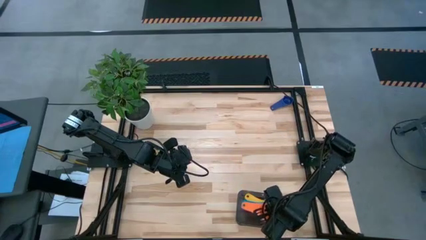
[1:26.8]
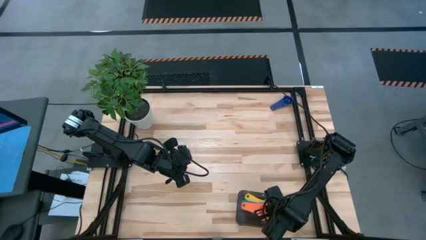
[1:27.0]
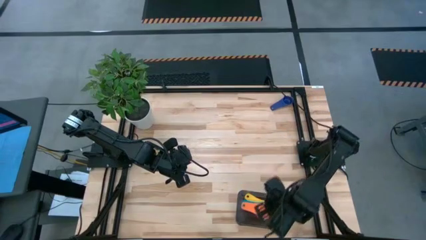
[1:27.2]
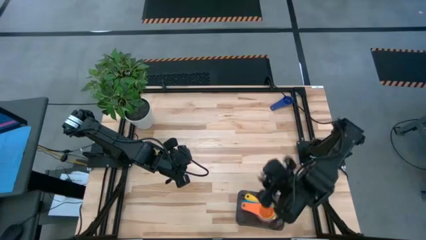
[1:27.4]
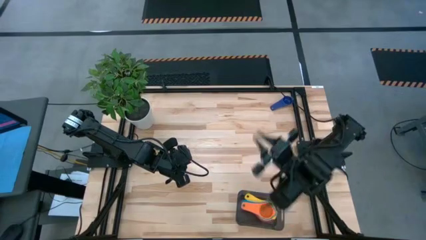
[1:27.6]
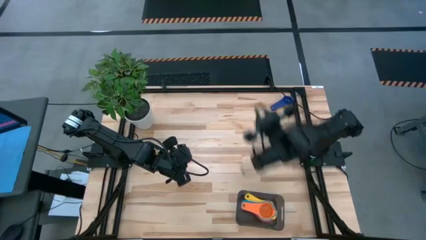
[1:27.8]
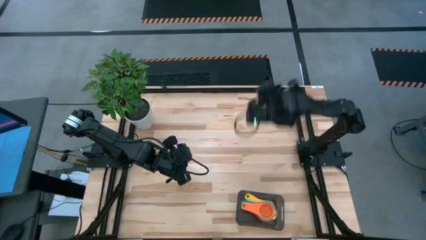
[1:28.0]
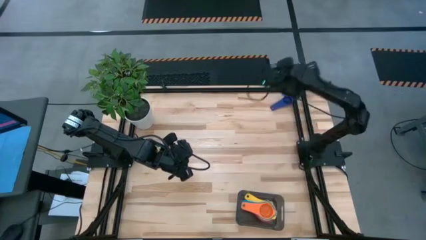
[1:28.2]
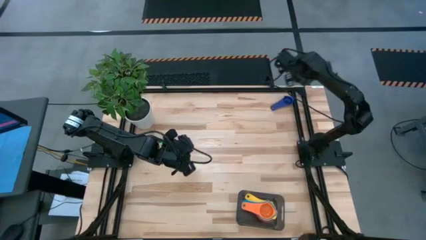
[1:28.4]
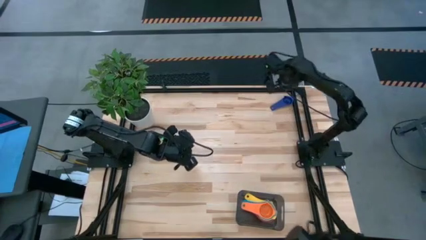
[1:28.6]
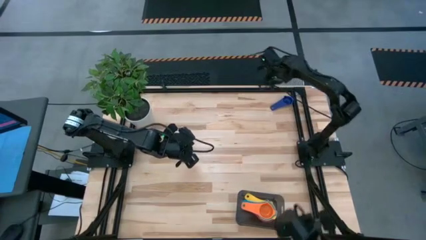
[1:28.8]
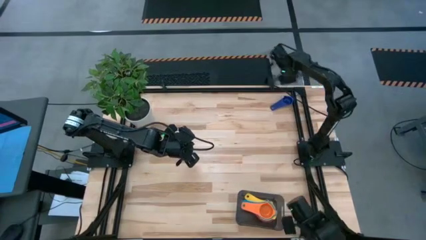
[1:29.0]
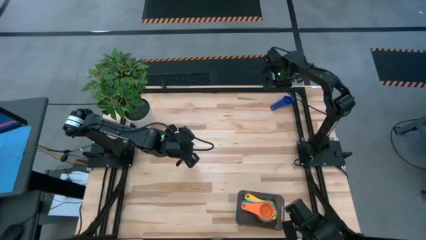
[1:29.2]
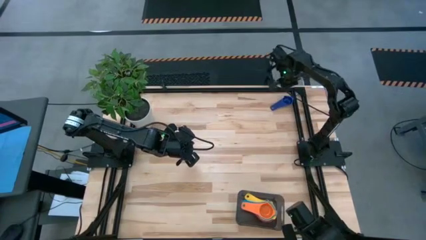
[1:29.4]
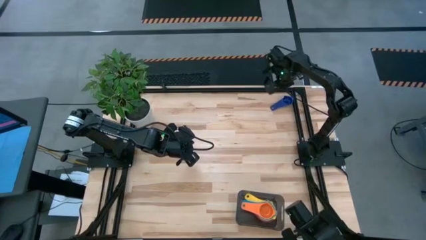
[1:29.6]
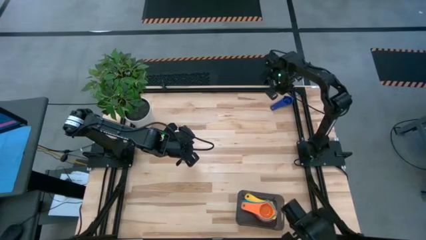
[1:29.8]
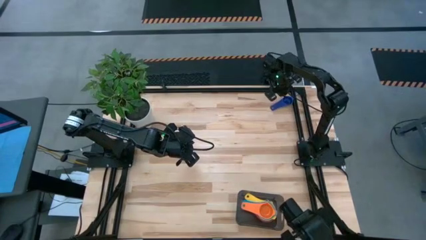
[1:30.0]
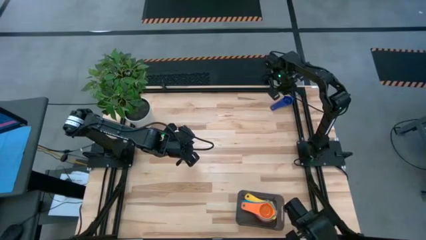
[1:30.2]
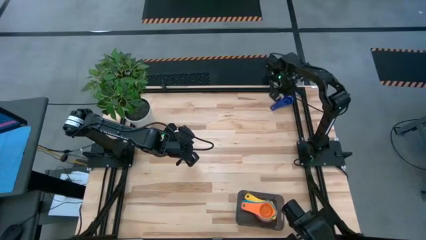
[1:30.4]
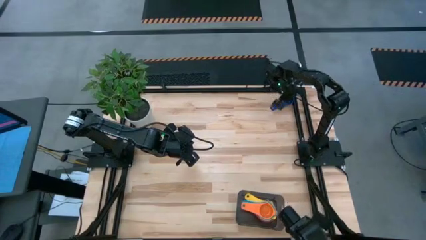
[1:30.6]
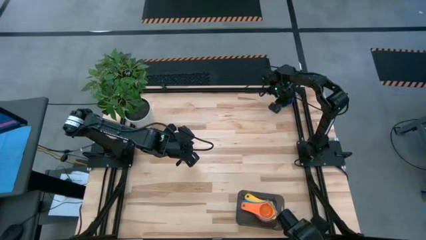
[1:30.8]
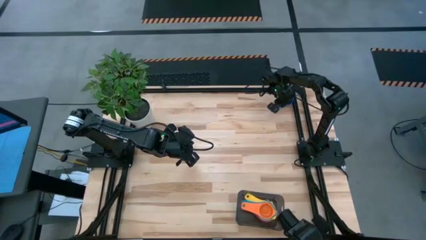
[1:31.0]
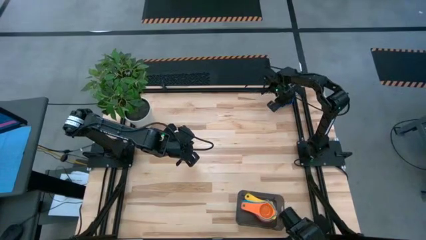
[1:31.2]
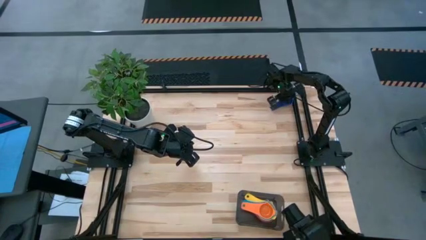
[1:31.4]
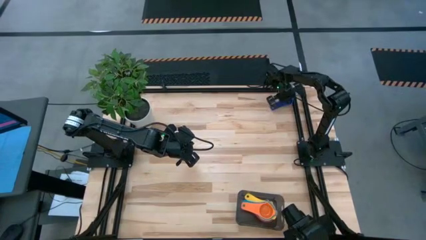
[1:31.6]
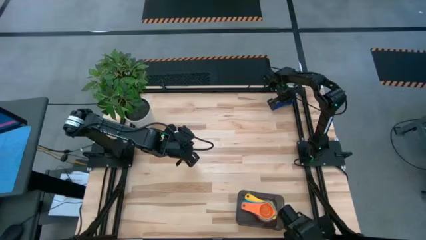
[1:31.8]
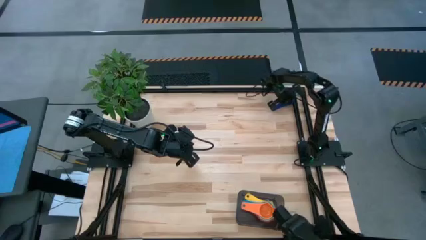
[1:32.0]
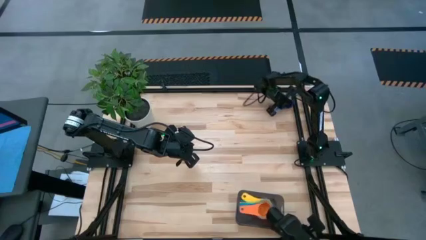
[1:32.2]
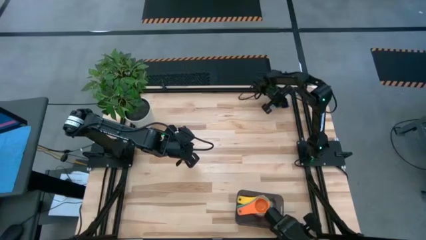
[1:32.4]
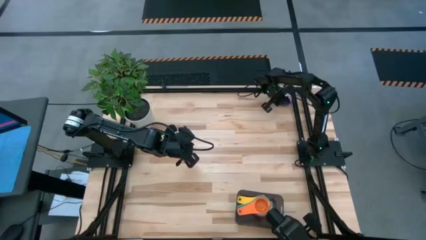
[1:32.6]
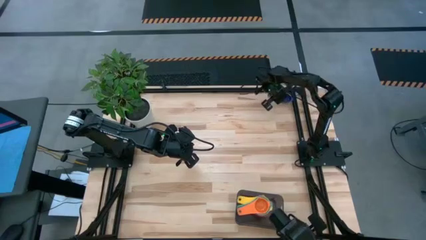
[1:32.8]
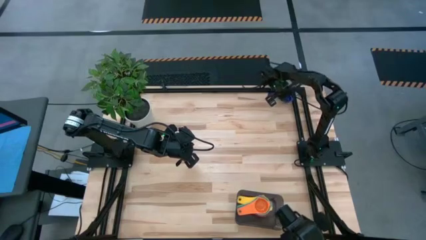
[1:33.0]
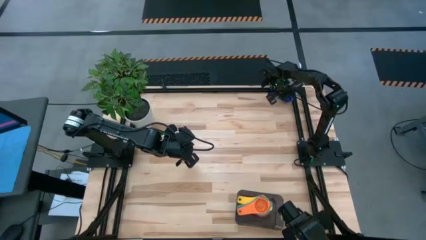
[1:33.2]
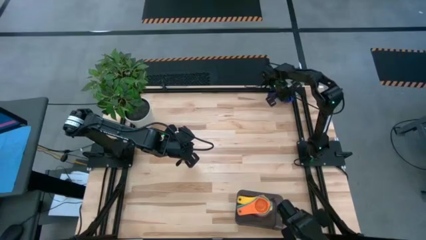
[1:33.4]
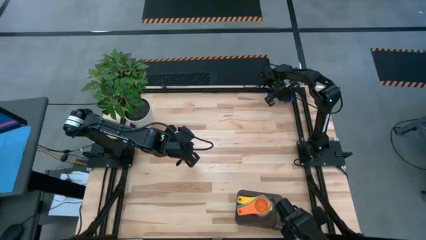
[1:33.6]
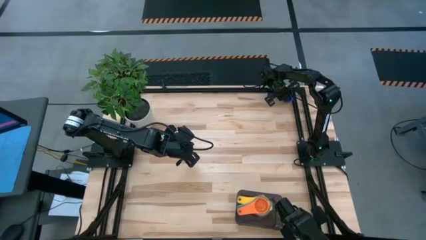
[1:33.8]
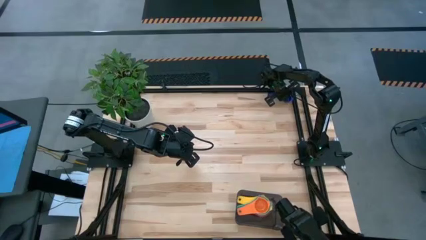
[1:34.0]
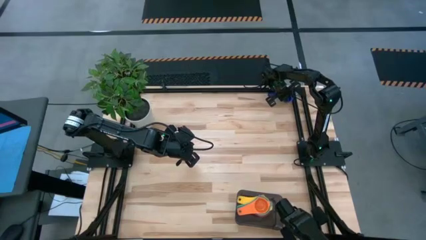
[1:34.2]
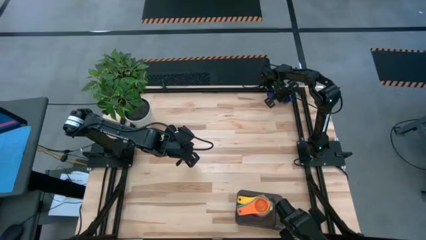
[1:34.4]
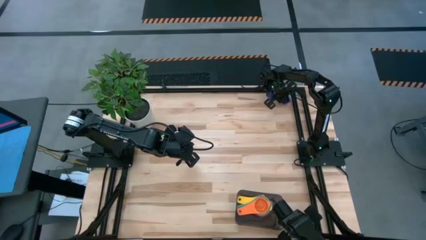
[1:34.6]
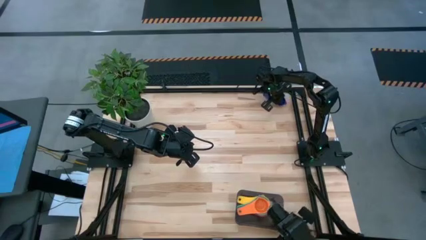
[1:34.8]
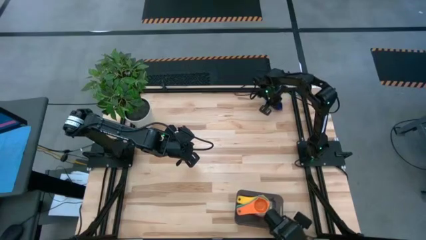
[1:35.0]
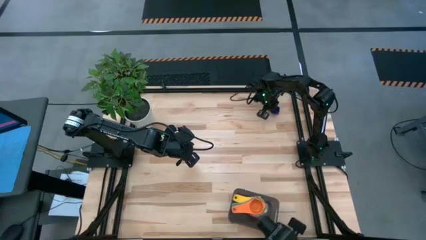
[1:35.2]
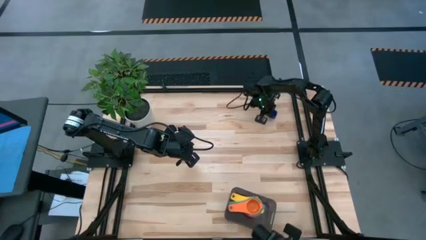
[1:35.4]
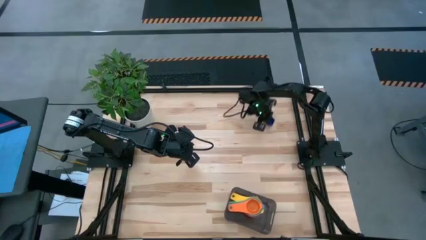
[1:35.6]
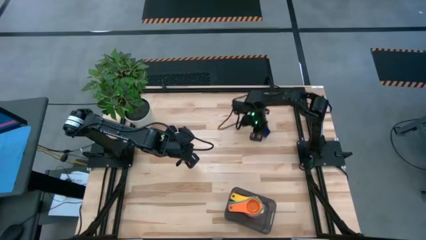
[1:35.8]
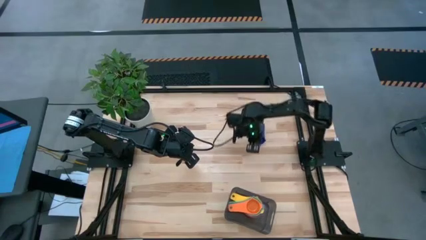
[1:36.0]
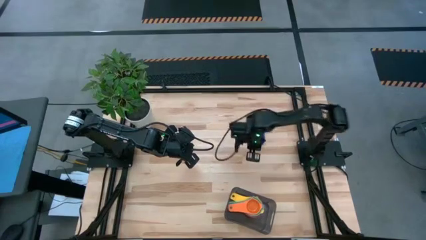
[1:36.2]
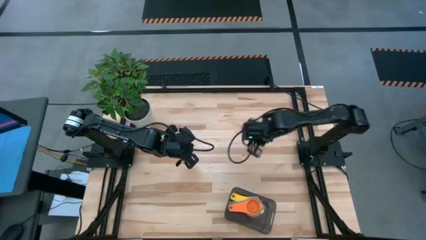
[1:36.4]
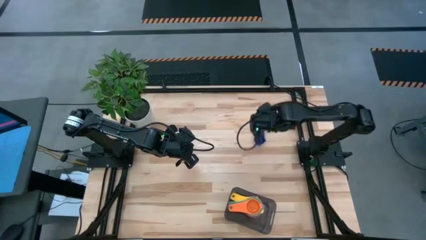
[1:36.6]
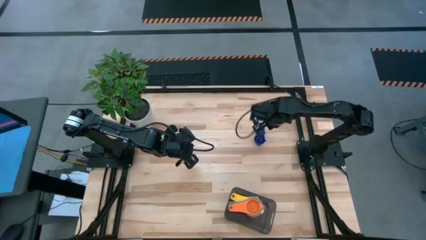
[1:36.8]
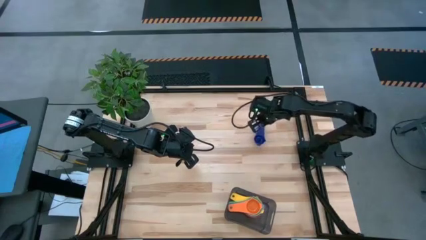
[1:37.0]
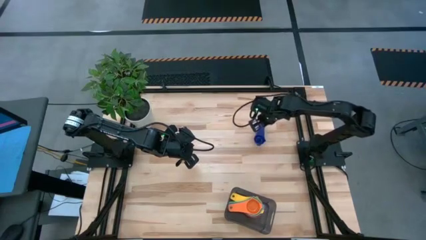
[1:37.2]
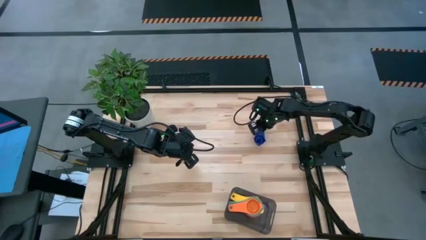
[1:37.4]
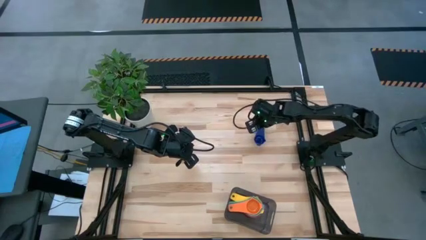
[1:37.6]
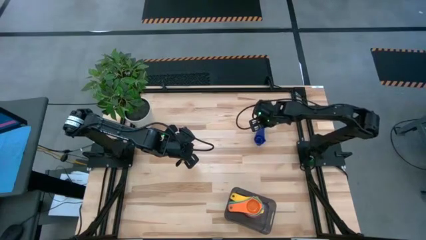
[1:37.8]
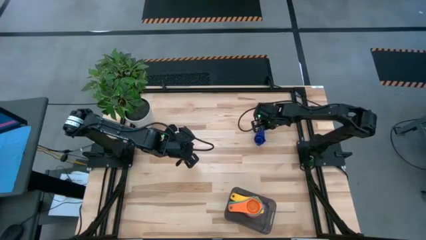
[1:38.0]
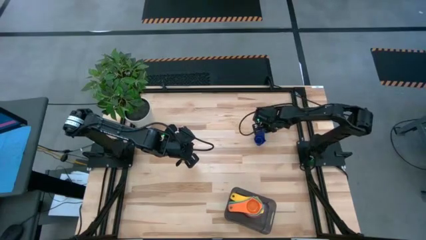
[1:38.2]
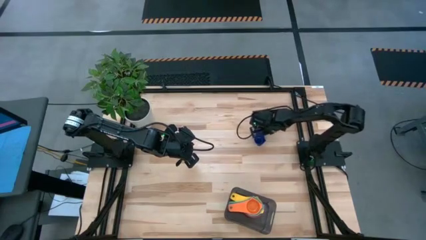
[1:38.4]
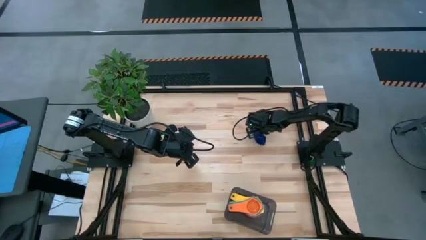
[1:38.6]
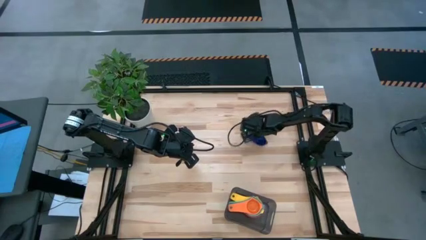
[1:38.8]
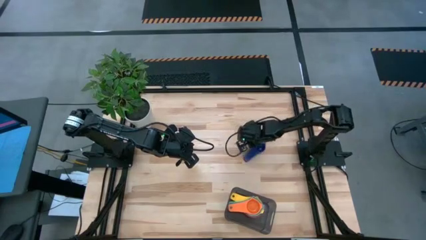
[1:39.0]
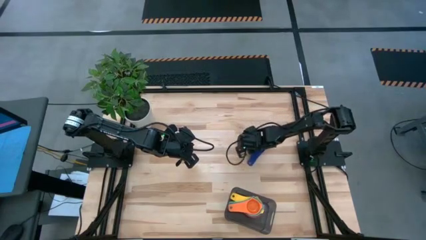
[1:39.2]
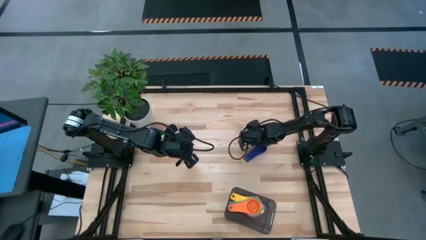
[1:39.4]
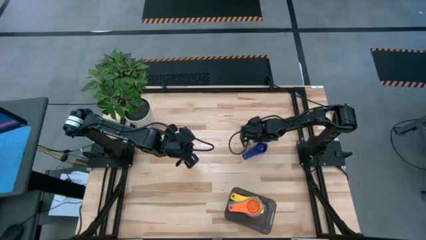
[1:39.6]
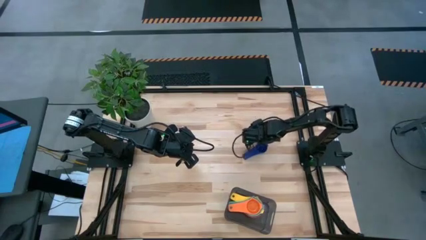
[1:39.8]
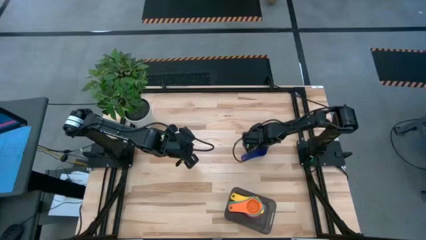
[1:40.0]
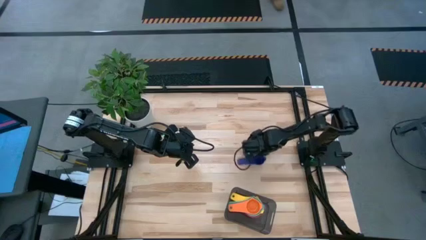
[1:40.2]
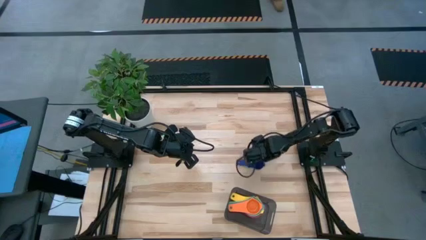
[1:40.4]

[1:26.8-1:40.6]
Task: Nest measuring cups in basket
Move the dark blue measuring cup on the center of the table

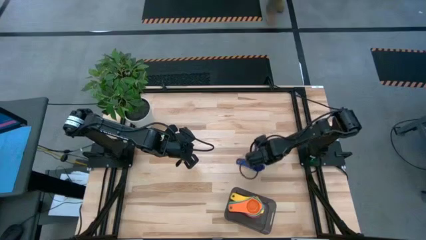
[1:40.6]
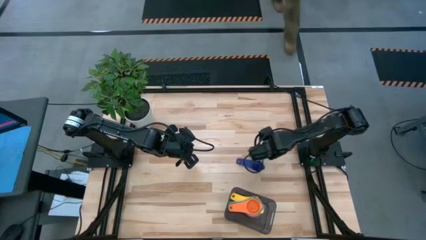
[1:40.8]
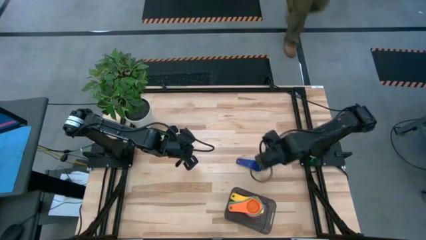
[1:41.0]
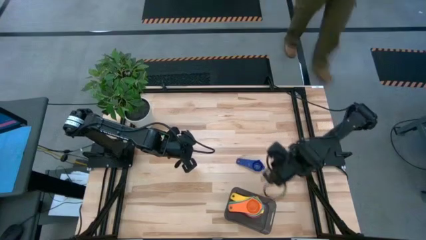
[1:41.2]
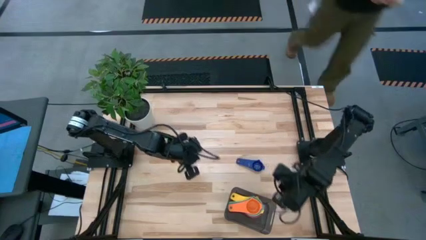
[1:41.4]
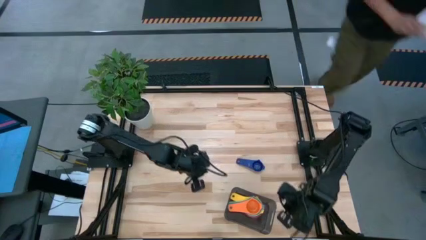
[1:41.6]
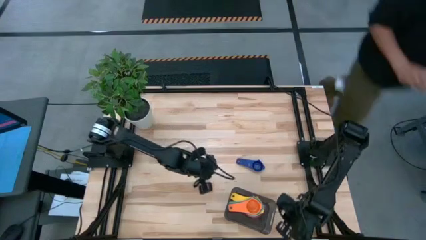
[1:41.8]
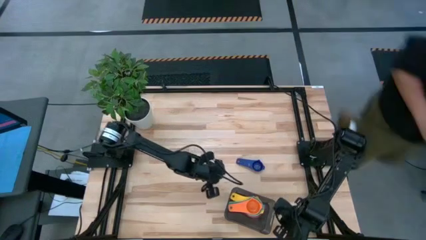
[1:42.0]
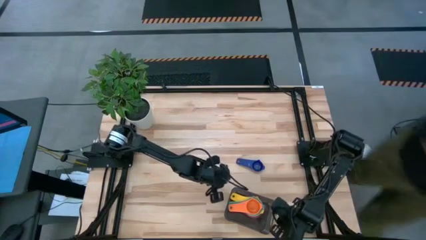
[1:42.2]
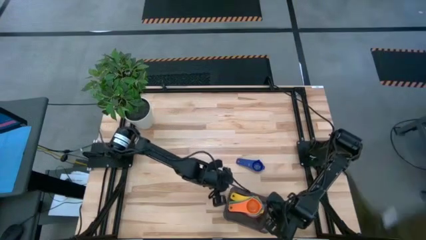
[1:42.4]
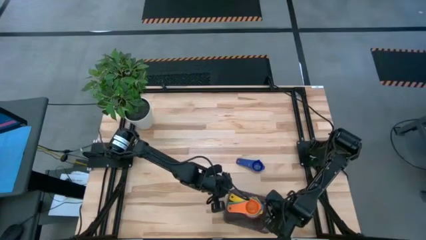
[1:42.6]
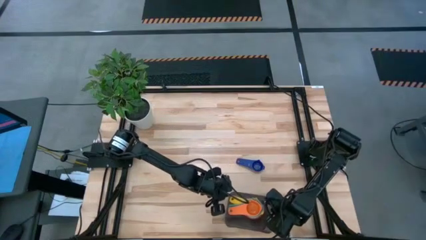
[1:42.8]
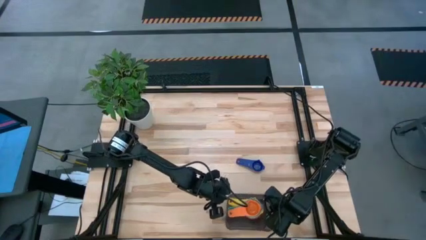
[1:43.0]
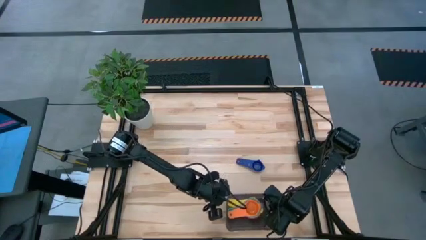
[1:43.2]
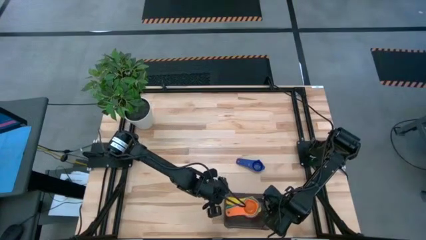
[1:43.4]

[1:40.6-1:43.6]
Adjust the transparent black bin
